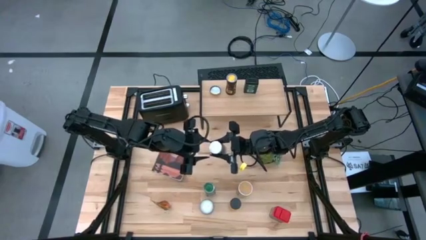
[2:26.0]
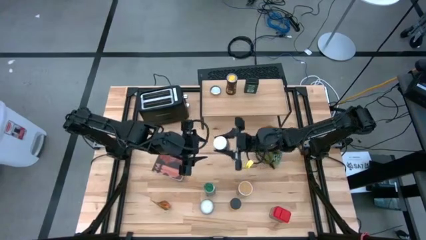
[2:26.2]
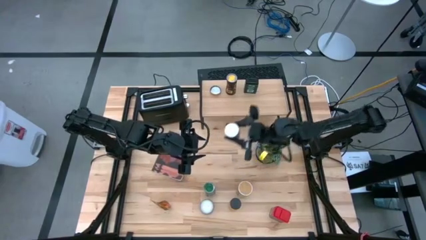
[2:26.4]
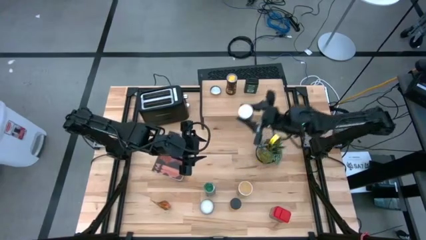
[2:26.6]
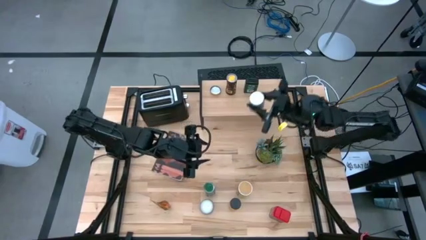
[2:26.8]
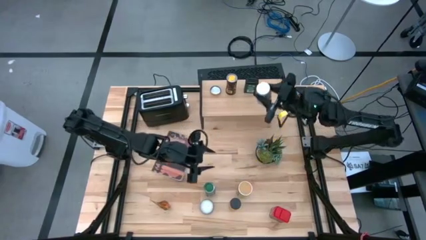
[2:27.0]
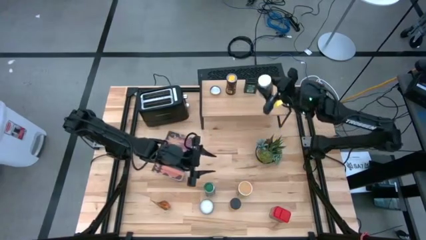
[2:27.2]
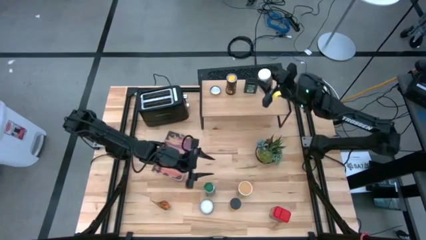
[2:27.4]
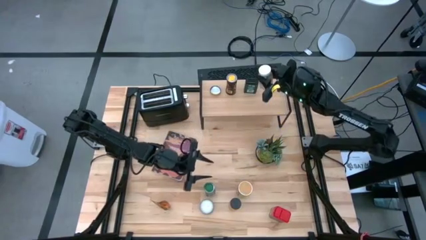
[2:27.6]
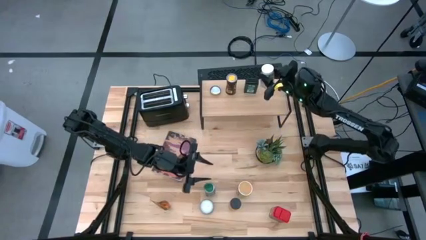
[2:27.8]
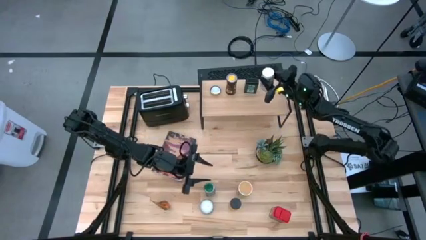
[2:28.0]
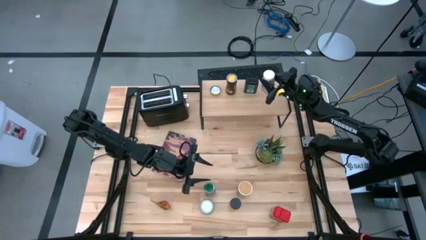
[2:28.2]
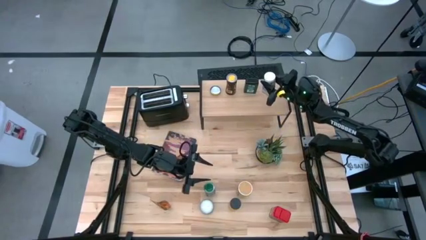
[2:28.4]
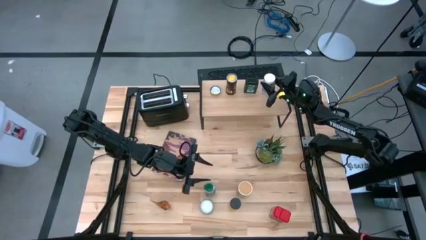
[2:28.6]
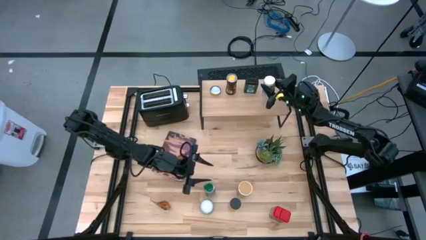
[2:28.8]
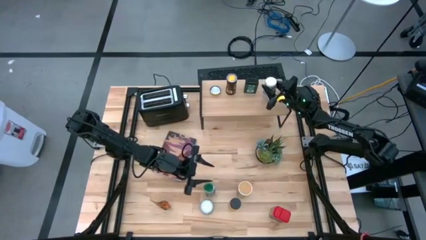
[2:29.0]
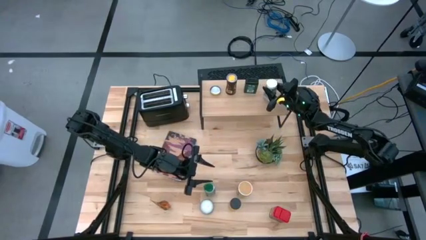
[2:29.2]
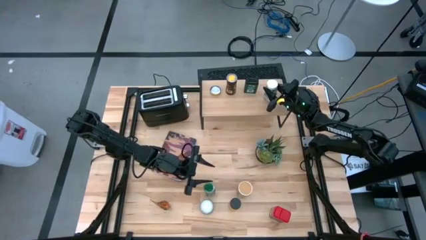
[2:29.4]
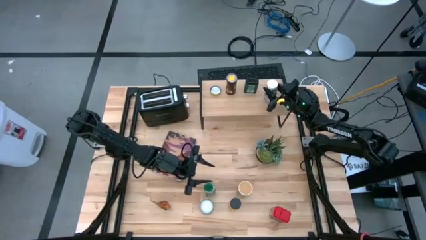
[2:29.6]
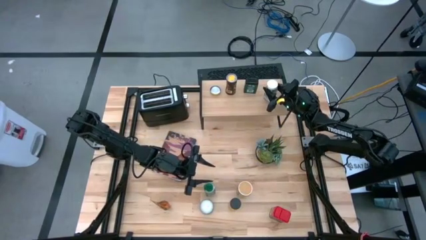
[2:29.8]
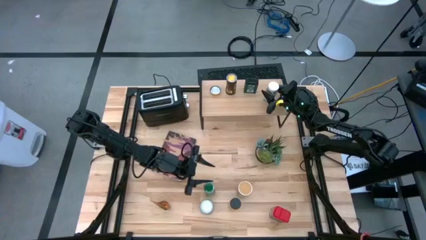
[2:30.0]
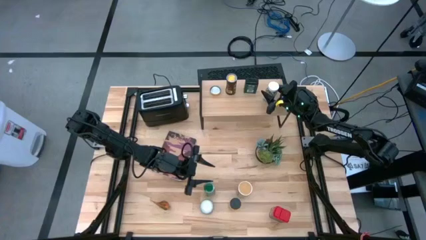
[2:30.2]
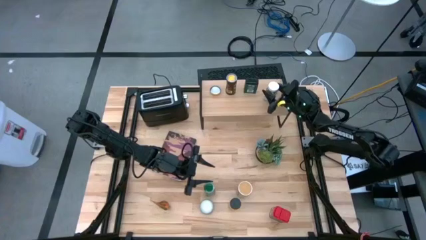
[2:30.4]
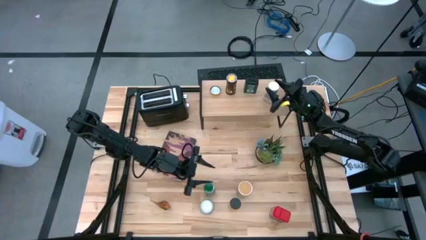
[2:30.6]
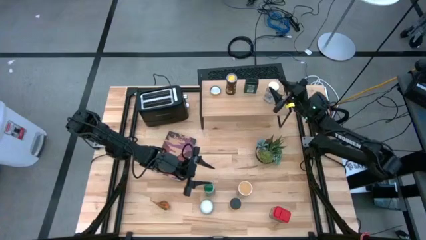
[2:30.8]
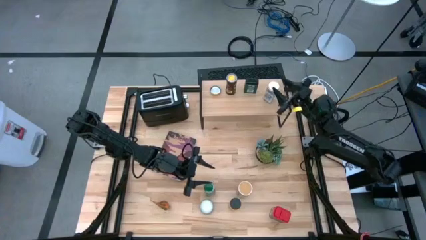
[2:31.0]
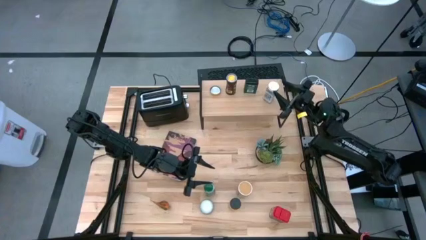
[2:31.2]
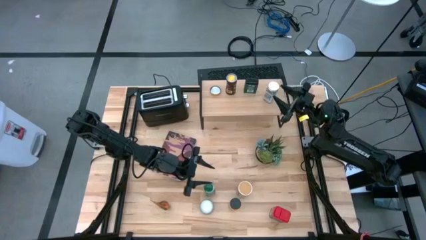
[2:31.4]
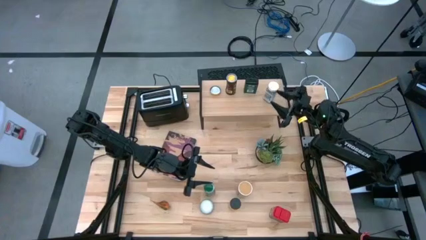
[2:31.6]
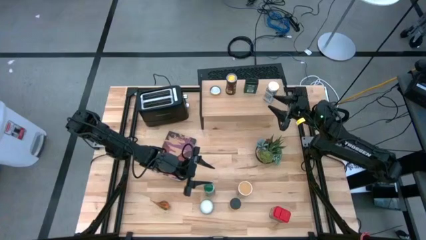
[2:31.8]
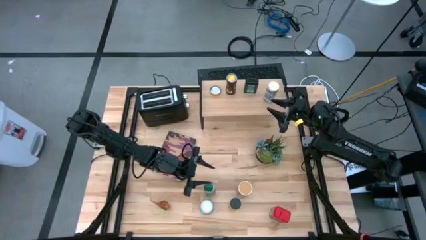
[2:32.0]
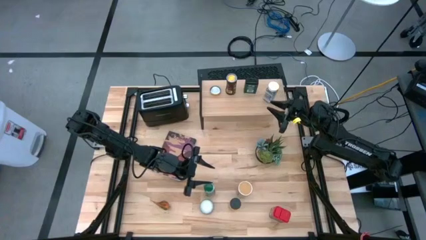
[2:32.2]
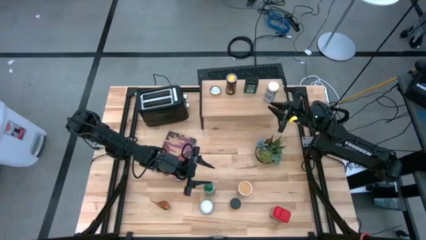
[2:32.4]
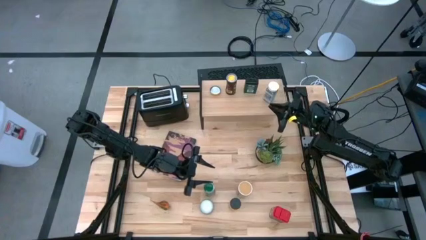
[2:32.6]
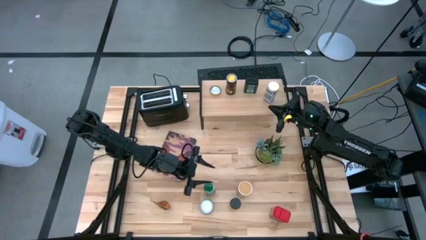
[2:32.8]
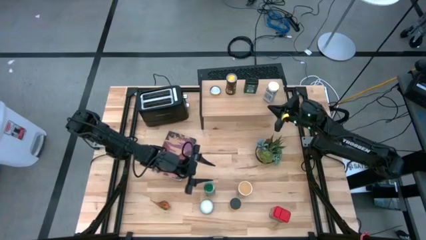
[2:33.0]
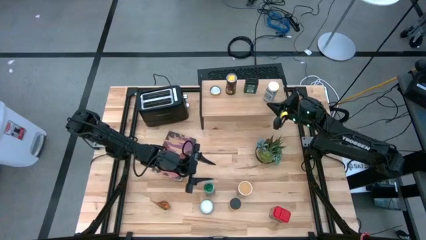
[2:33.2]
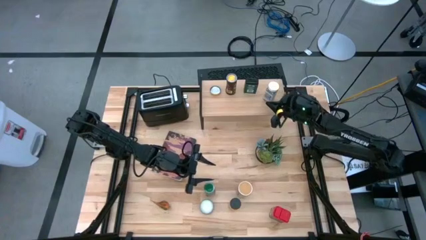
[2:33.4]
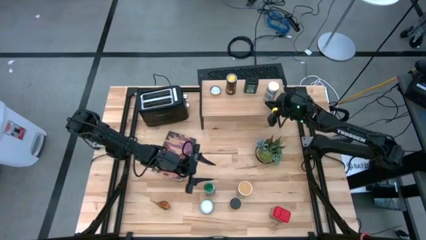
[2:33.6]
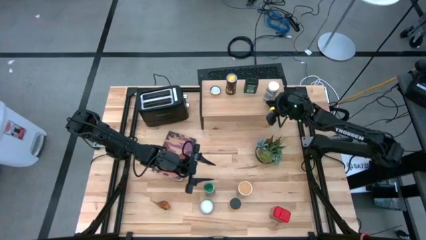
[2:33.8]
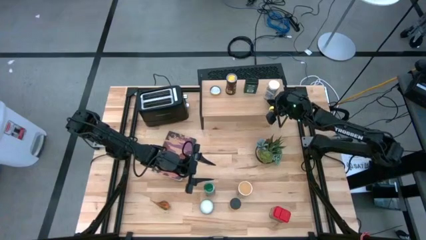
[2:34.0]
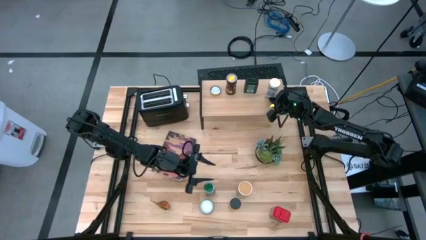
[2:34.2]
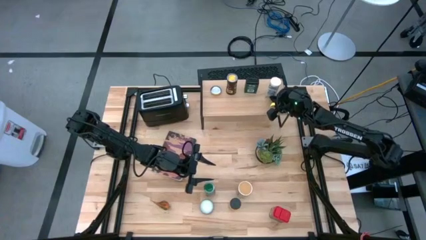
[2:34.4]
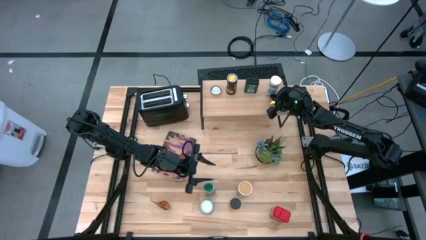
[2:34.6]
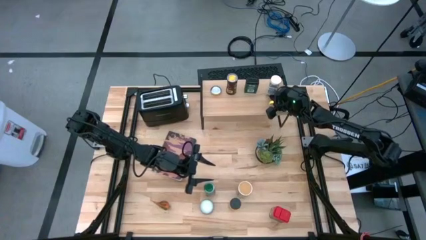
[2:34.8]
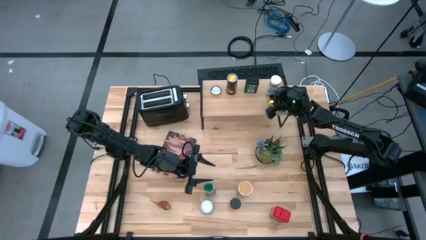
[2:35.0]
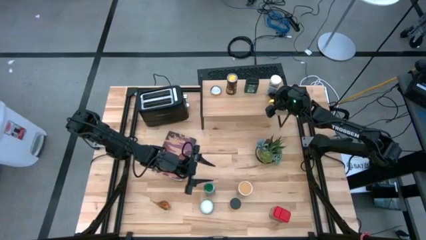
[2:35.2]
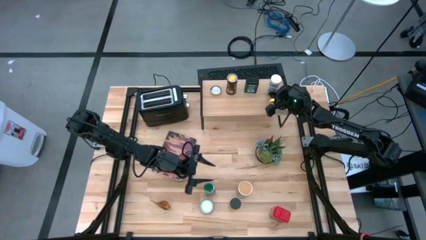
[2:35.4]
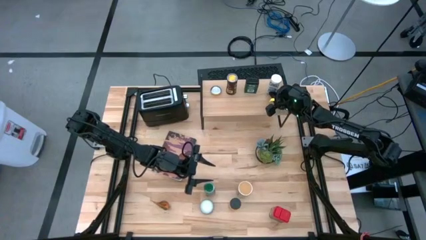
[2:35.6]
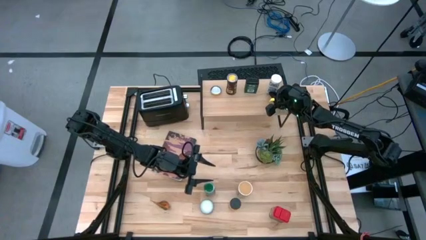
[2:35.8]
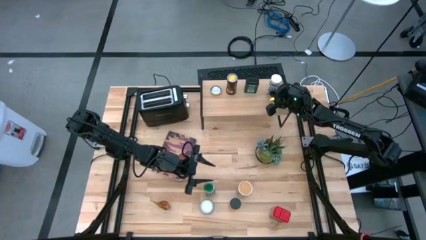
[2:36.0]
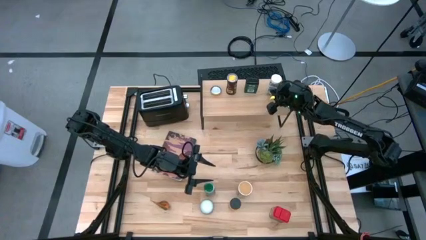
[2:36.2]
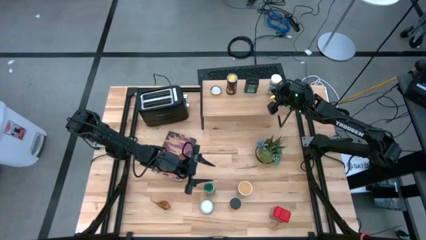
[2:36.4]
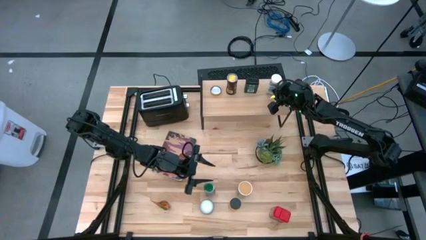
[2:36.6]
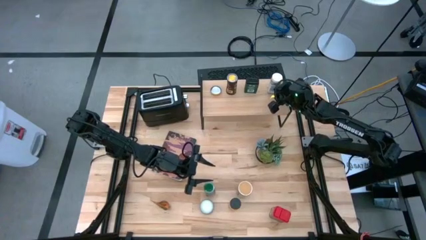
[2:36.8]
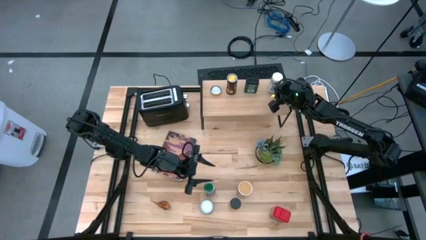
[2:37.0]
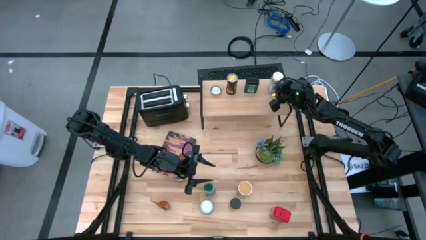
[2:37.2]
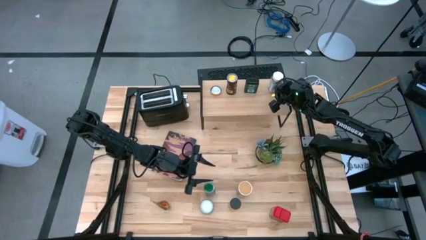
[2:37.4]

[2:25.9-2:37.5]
Task: Shelf spices
Put the white seasoning bottle on the shelf

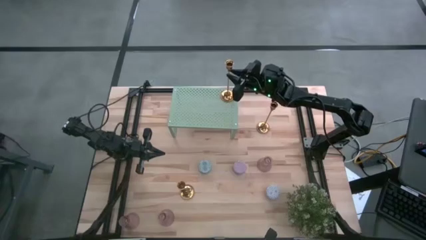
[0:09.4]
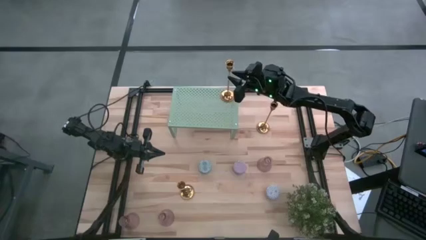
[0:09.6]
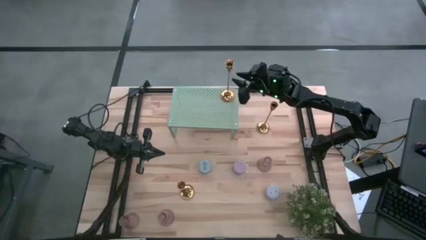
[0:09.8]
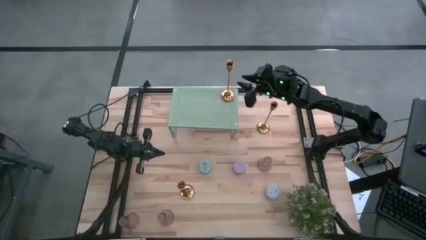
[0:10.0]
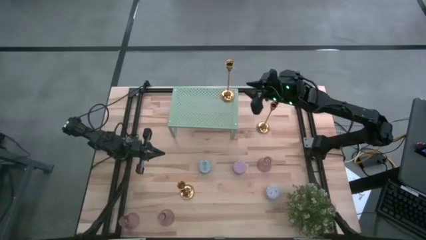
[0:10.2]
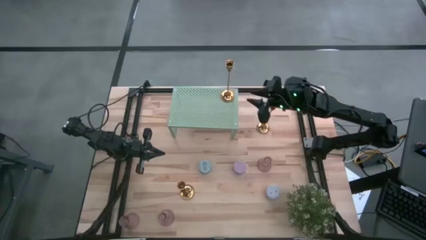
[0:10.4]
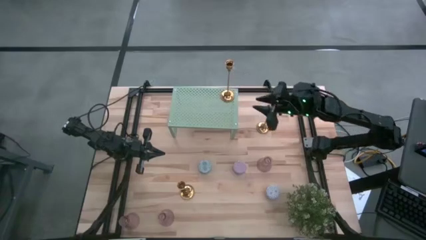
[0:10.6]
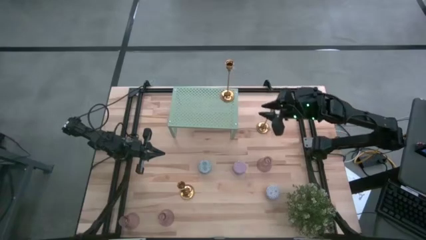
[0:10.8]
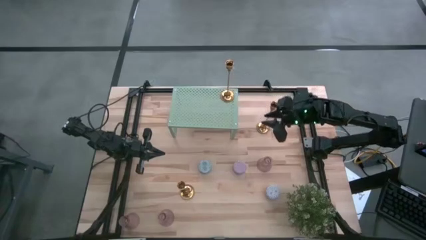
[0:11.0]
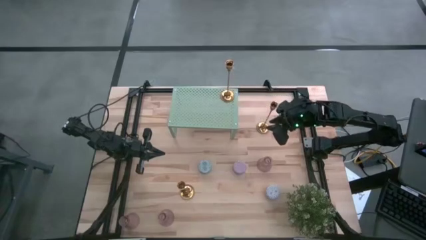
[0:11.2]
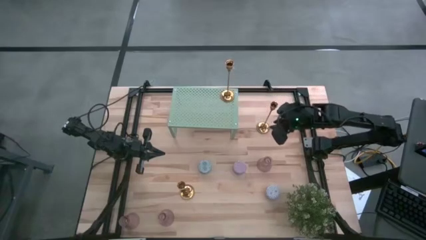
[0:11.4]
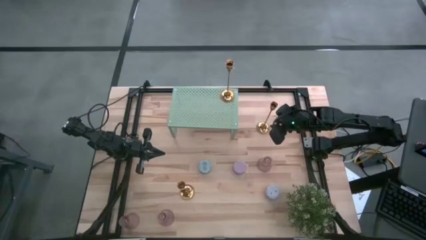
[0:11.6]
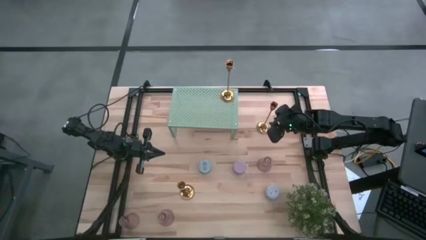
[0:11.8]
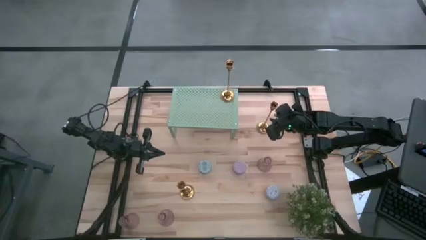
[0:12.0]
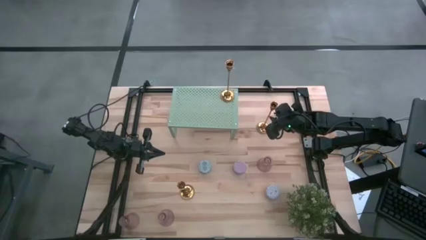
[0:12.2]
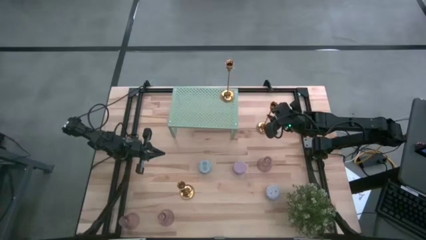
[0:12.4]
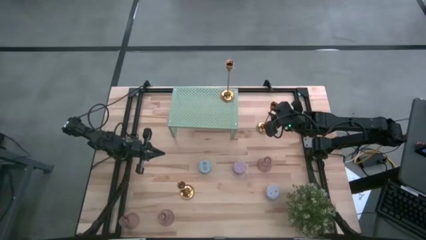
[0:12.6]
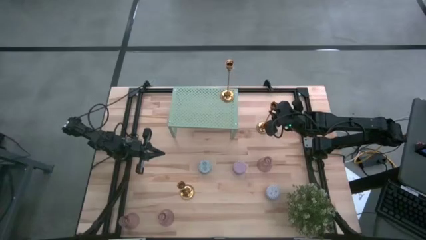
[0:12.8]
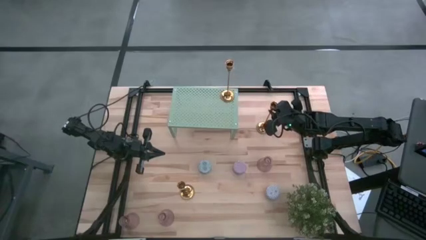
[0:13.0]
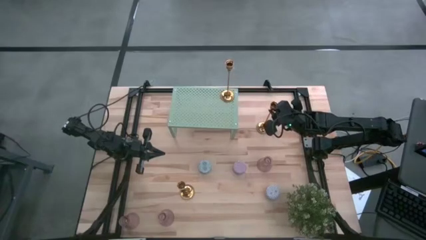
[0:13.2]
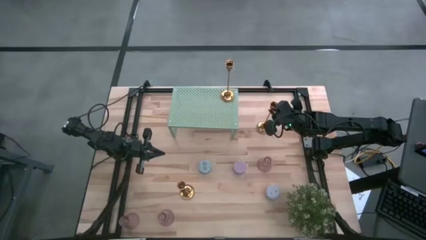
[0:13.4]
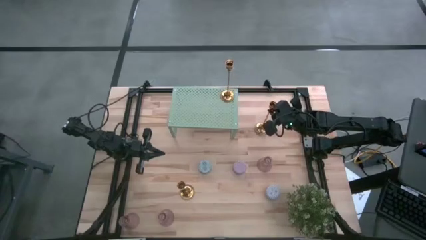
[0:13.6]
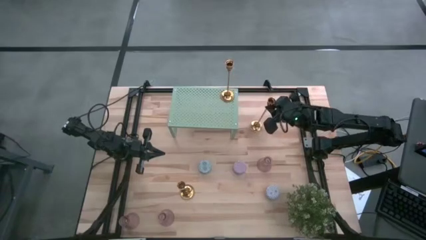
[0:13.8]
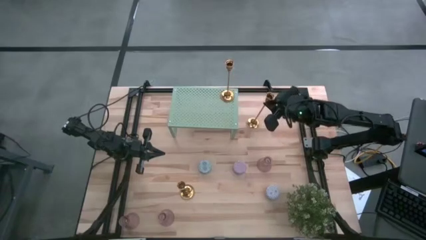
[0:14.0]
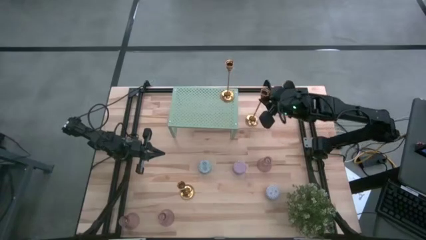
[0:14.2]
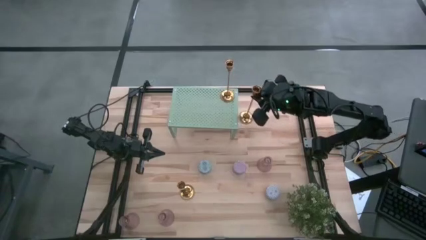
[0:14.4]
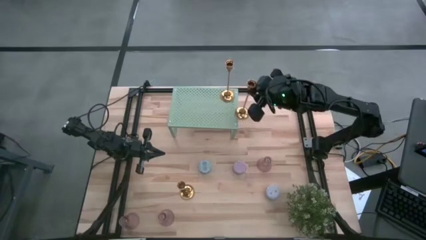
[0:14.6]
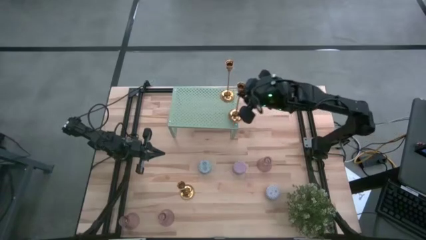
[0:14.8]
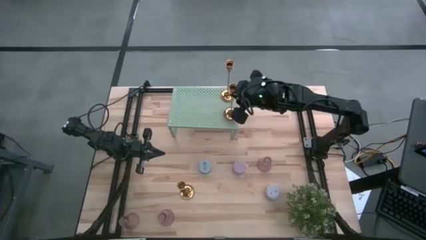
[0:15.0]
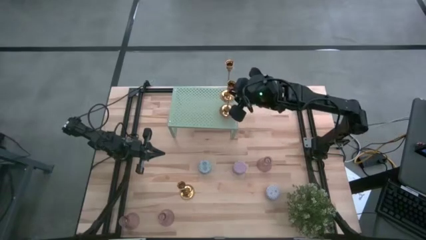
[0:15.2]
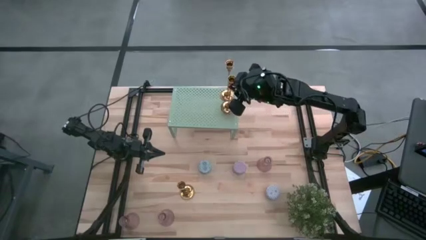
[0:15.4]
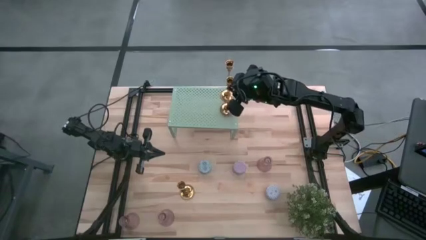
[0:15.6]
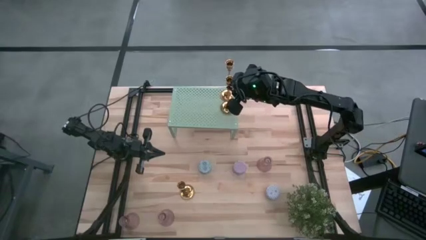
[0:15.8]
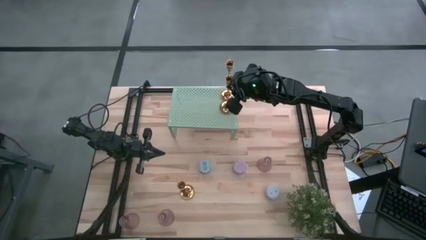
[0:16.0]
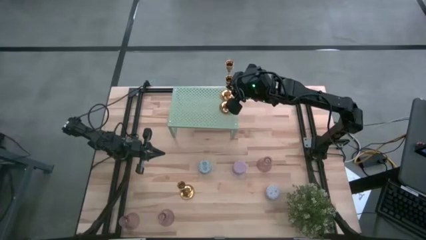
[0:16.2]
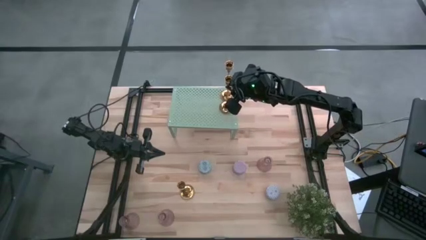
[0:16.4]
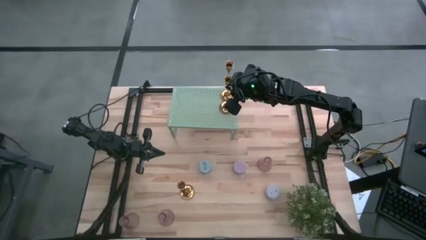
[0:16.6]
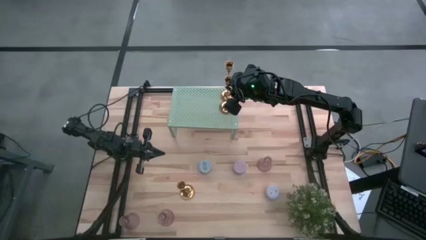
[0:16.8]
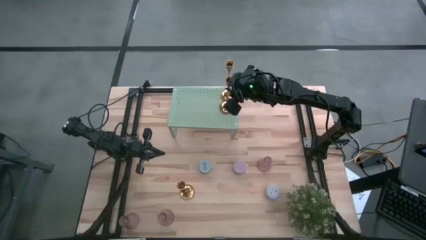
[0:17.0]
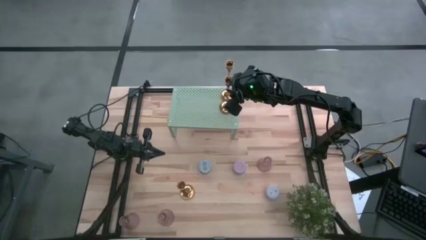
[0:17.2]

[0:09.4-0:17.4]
Task: Pick & Place candle stick holders
Put the top gold candle holder on the shelf aligned with the gold candle holder
